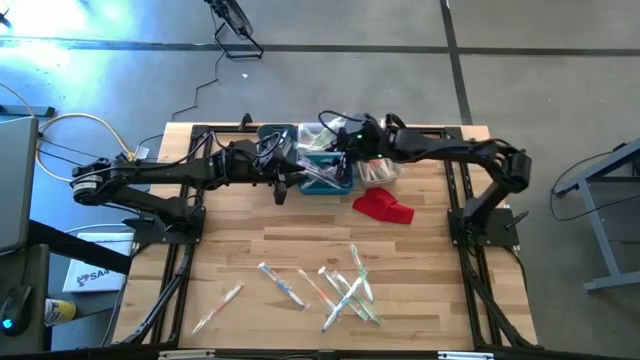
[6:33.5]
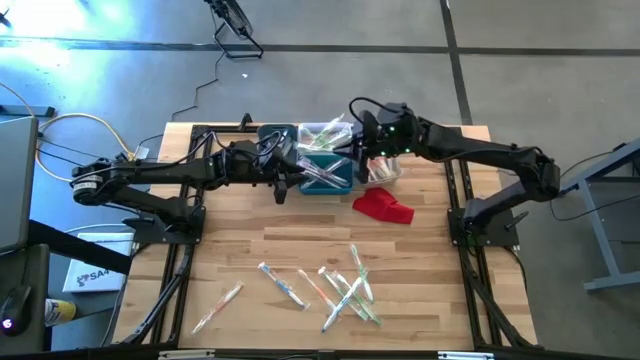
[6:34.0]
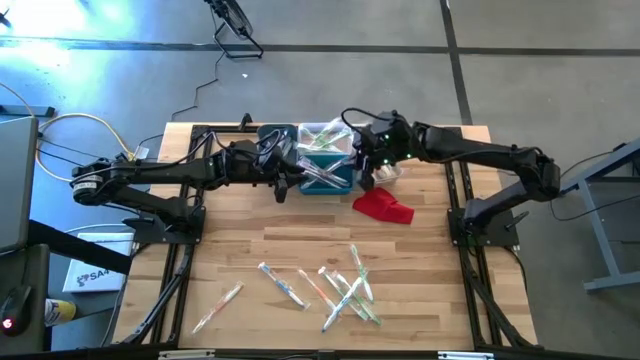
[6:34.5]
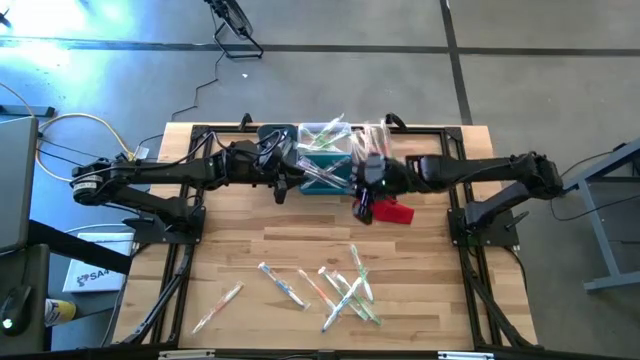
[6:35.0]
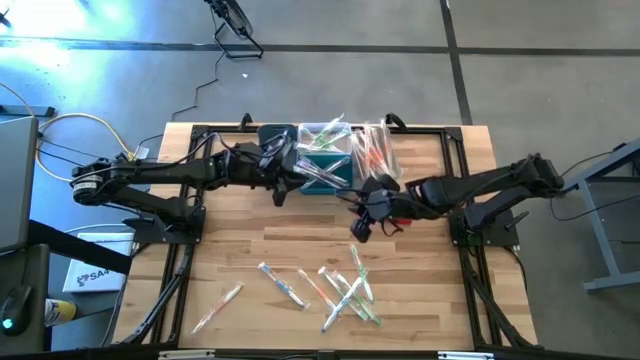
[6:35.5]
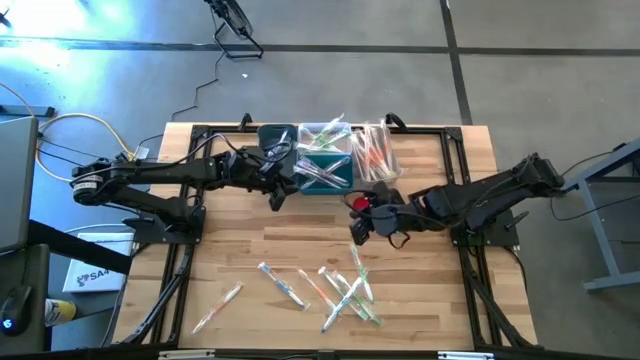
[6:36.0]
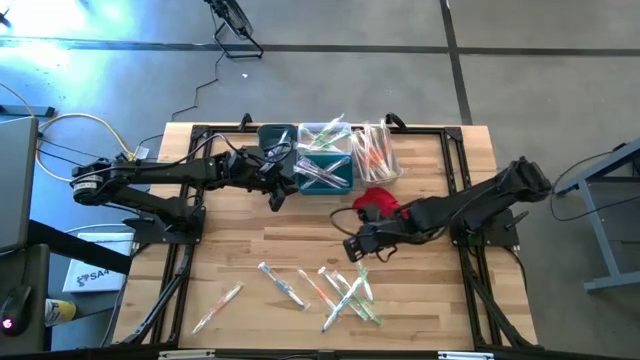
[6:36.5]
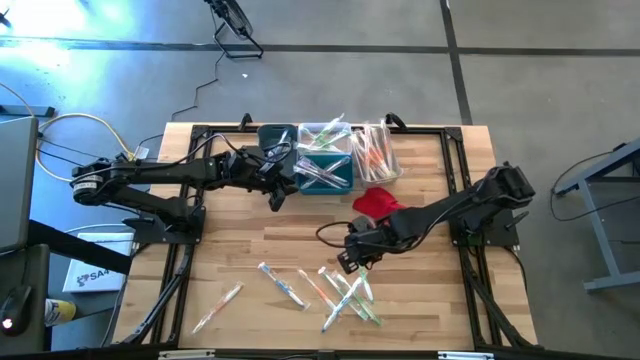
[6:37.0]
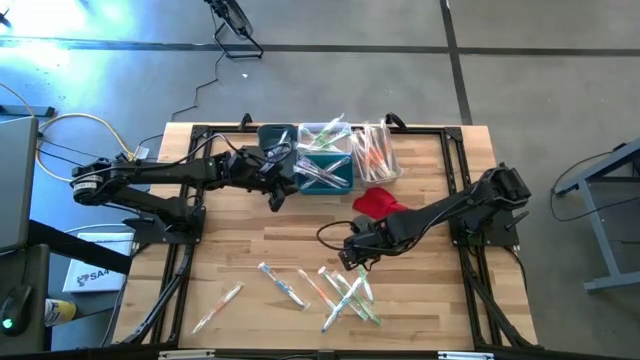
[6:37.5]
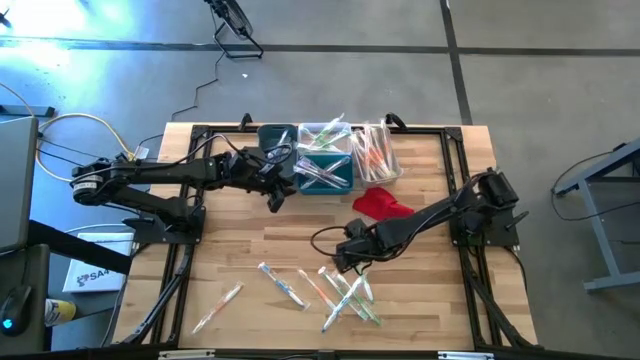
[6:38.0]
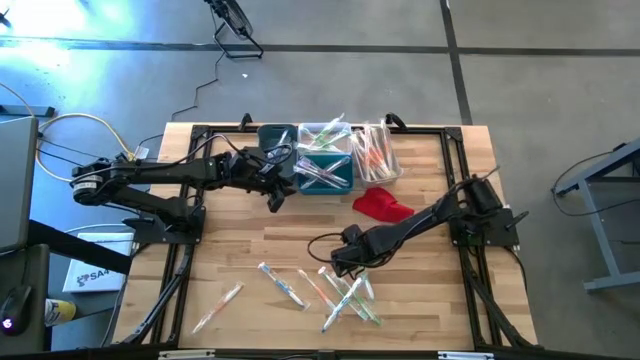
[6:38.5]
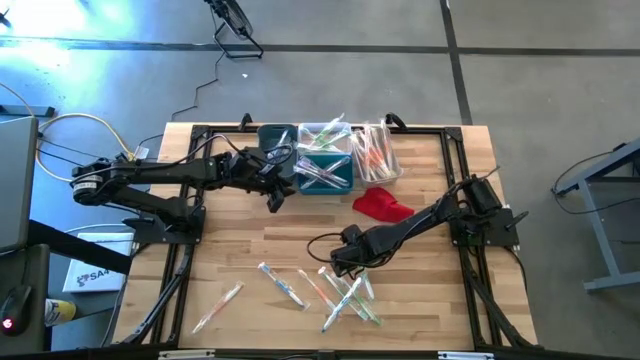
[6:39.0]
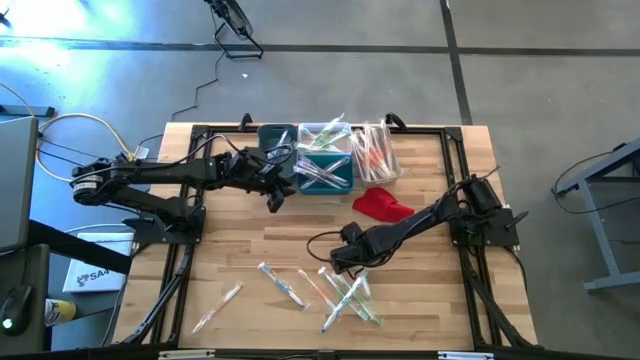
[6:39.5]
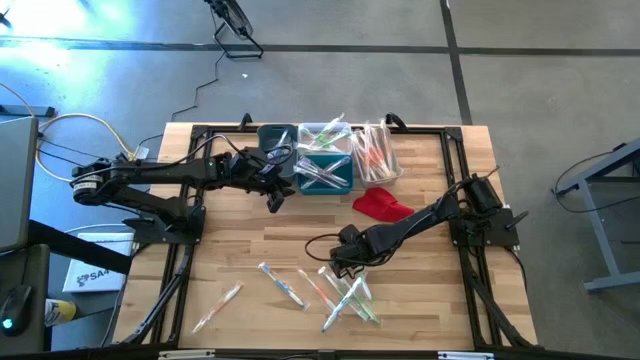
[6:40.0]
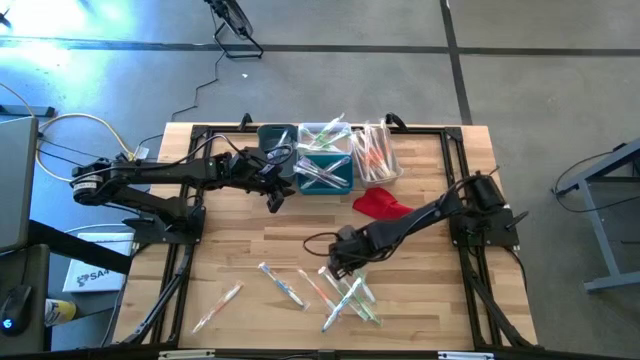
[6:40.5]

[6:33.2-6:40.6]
Task: Pick & Place Toothbrushes
Put the top right green toothbrush into the transparent bin

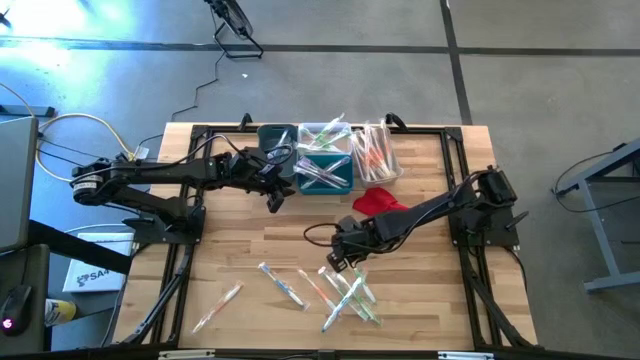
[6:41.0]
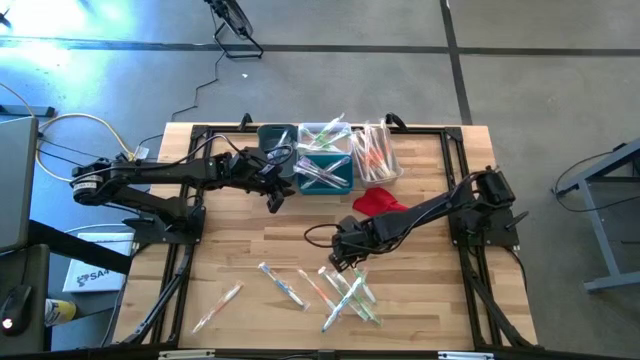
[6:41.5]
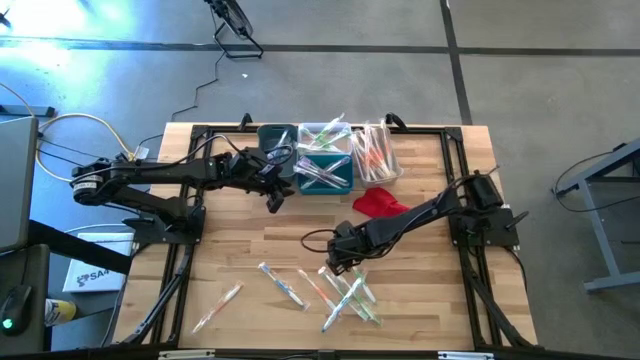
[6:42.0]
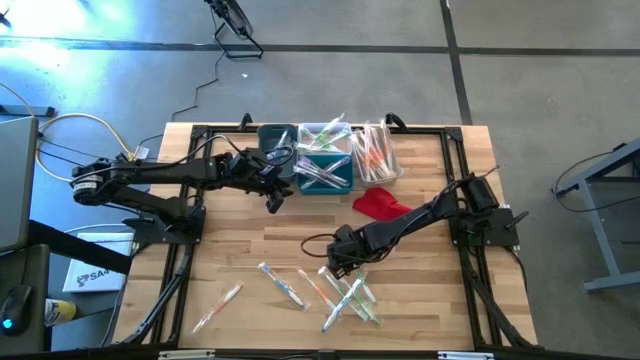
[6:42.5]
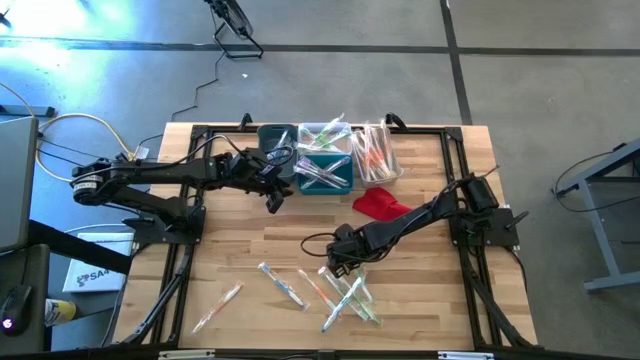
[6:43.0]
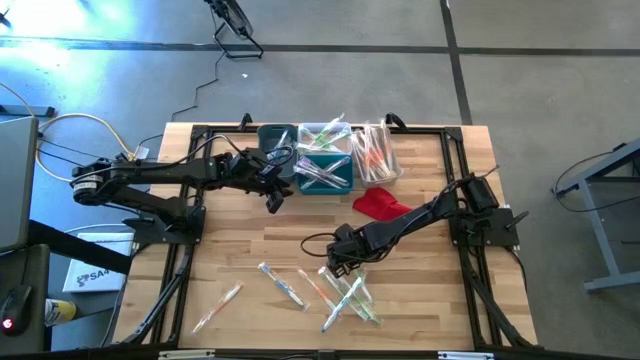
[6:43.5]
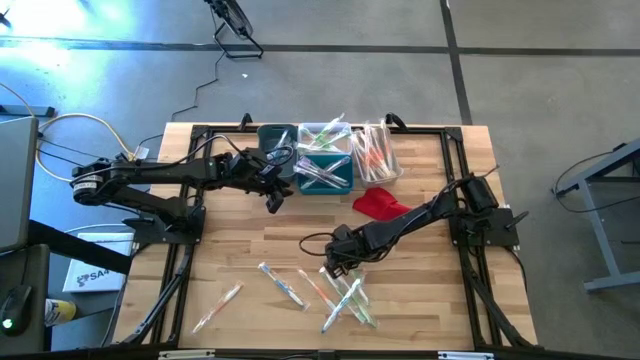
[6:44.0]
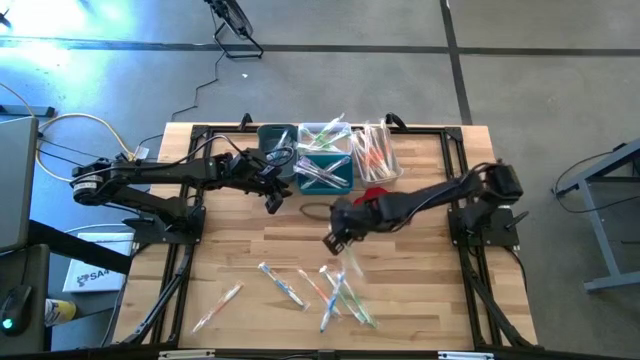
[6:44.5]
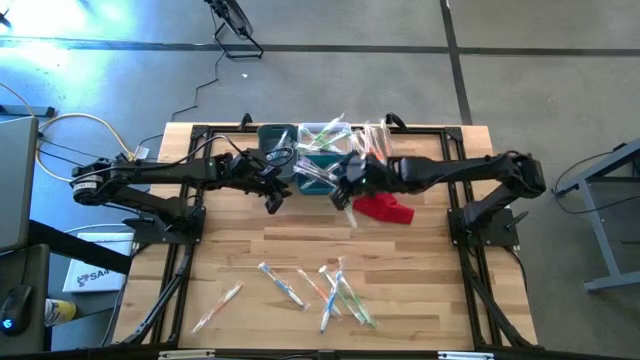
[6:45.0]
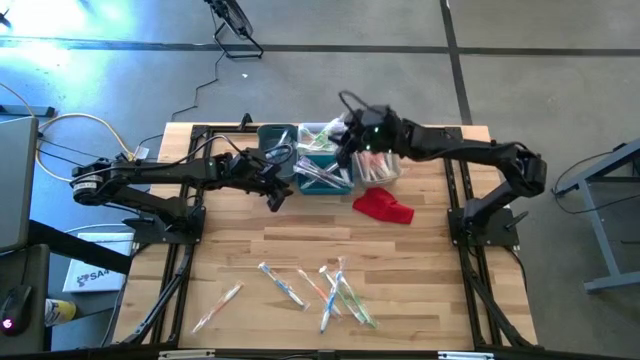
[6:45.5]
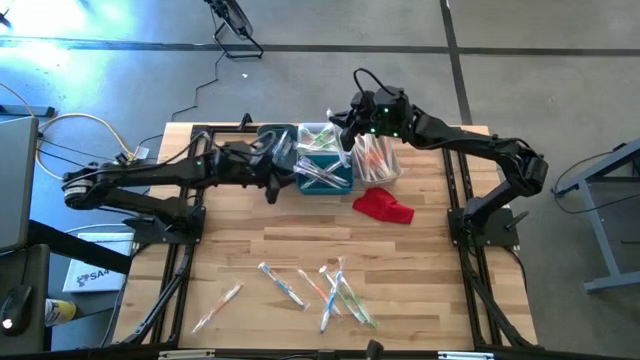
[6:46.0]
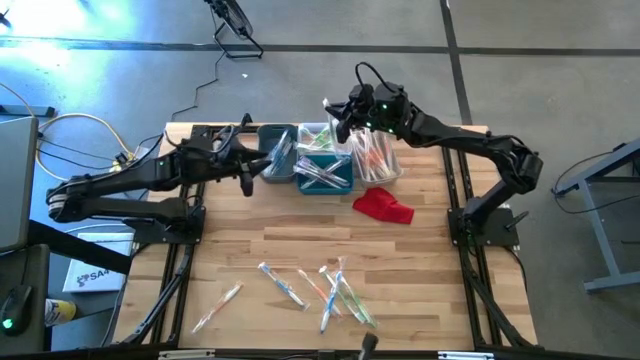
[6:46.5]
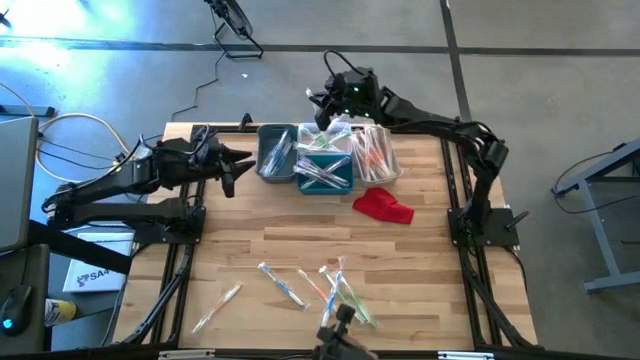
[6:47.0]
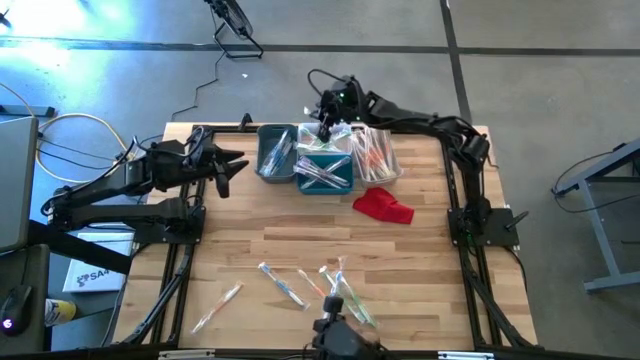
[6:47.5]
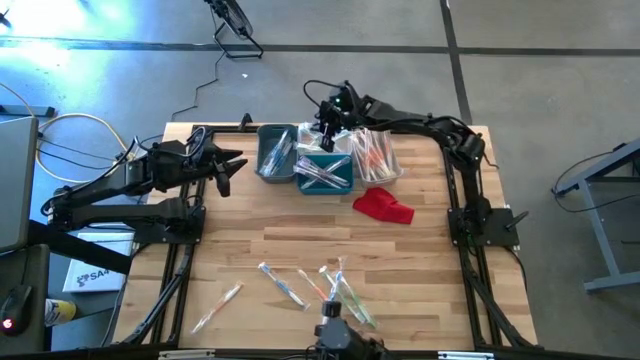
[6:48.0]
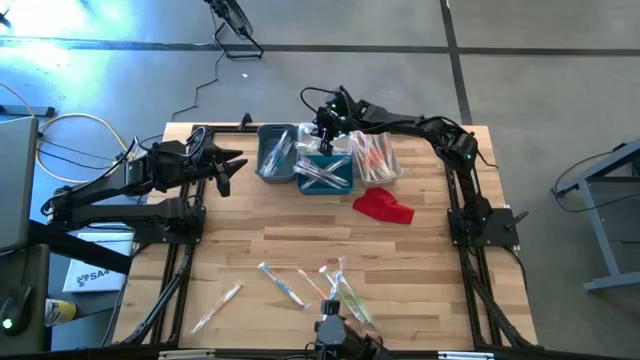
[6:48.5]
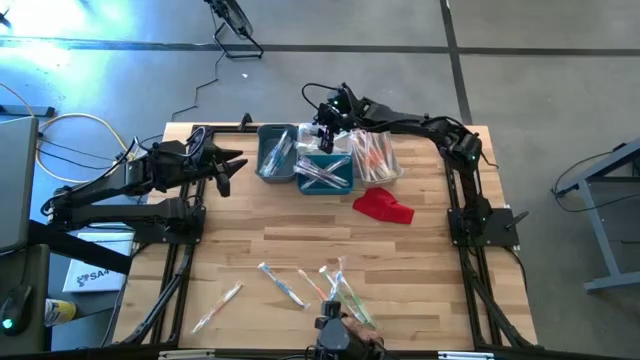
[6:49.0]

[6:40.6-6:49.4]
Put the top right green toothbrush into the transparent bin

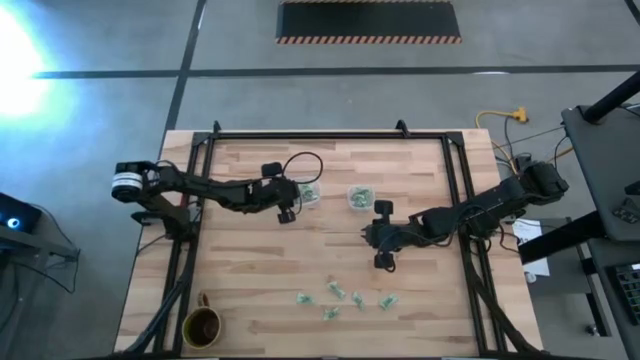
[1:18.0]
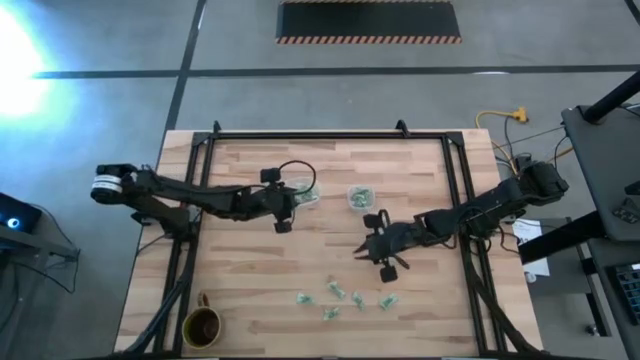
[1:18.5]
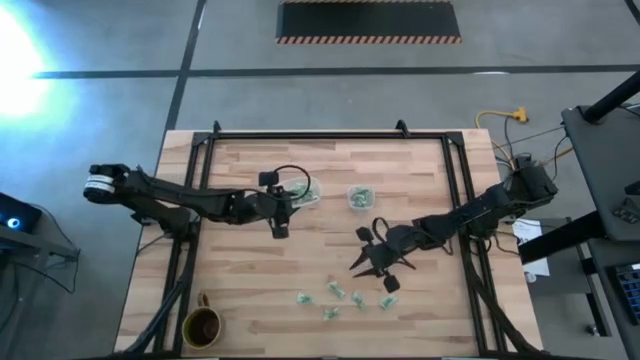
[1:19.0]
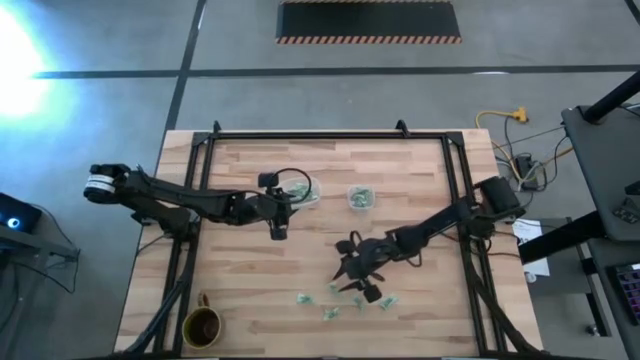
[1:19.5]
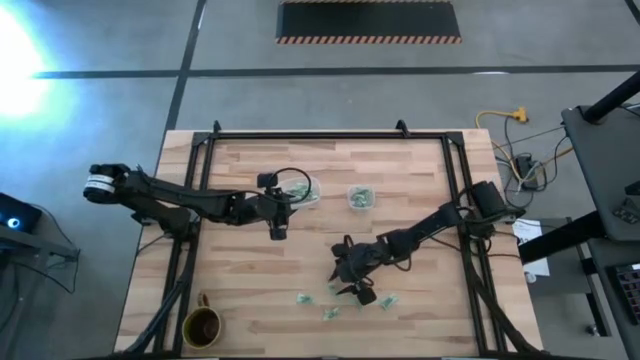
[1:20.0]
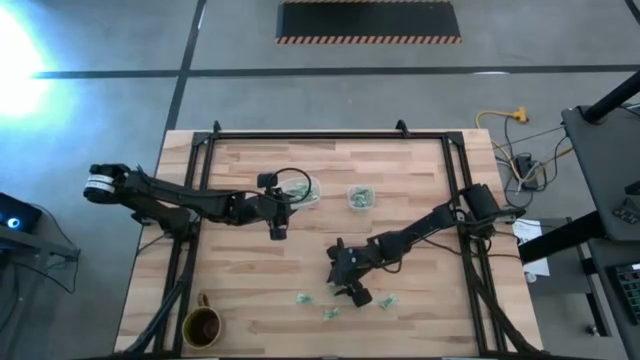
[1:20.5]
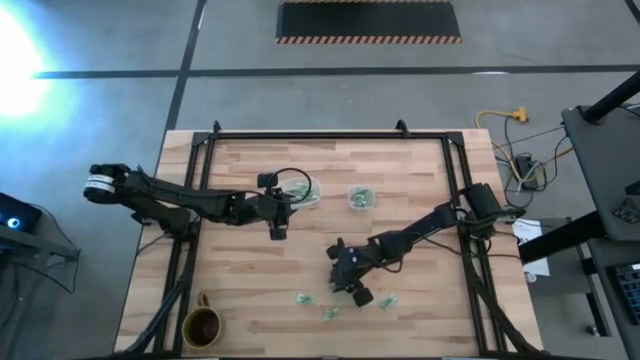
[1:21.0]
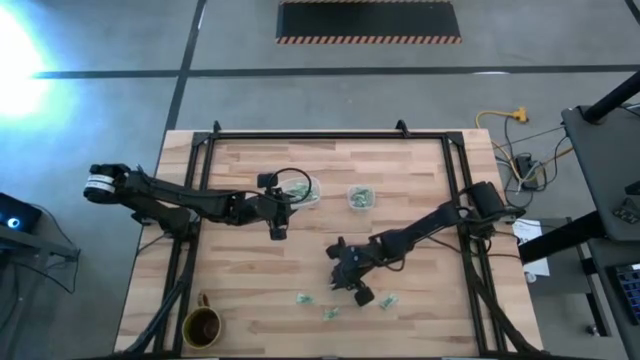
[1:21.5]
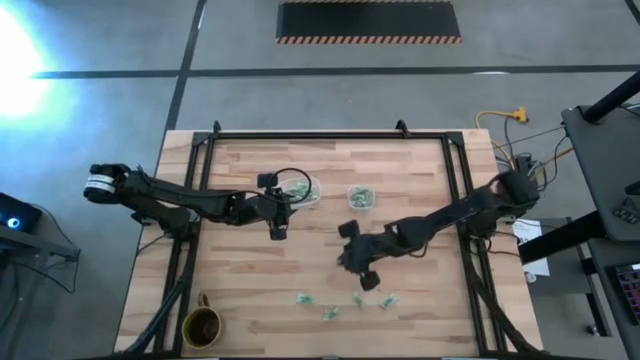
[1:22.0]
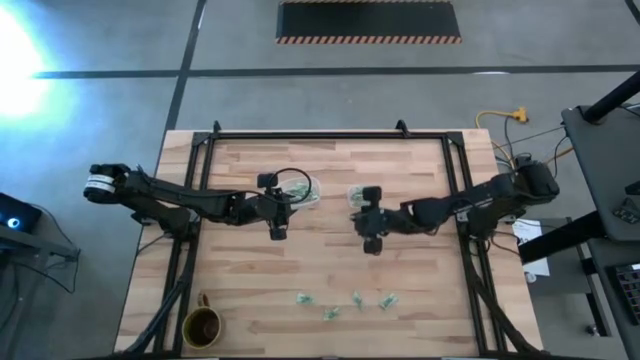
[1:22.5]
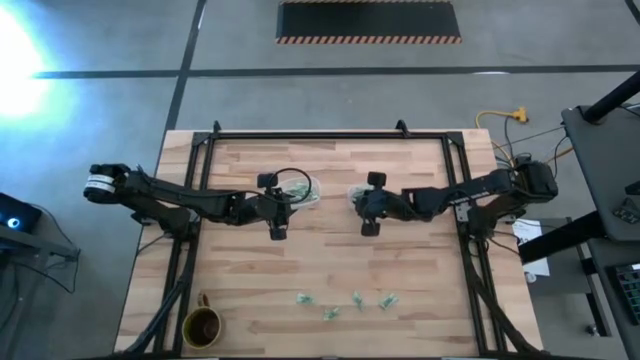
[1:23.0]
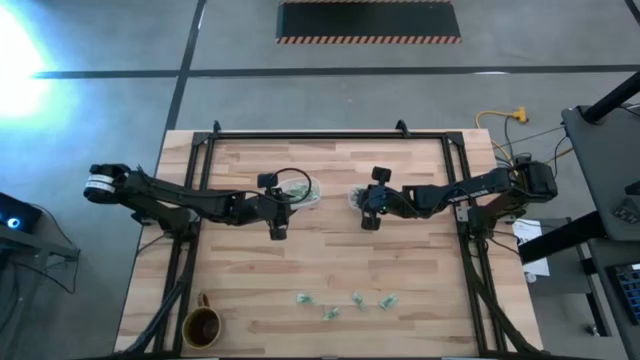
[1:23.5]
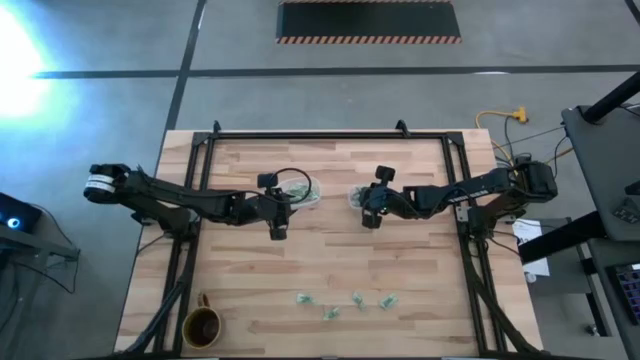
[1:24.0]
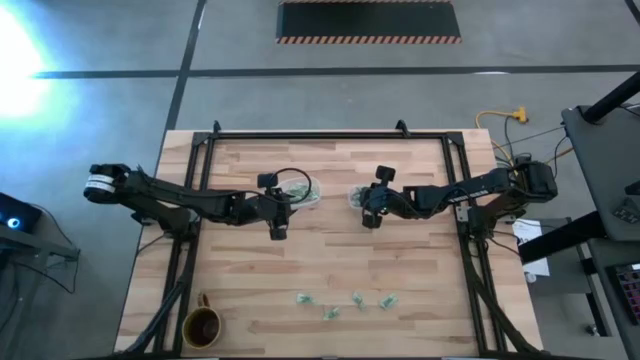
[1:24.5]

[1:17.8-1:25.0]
Task: Pick and place Stevia / Truvia into bins
Put the stevia packet into the transparent square container
